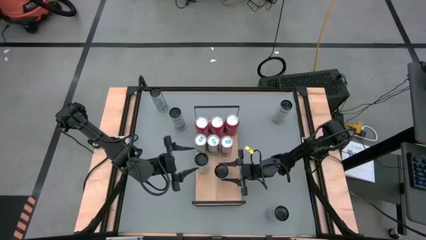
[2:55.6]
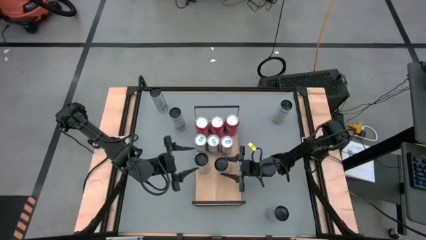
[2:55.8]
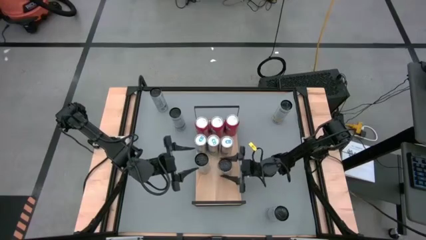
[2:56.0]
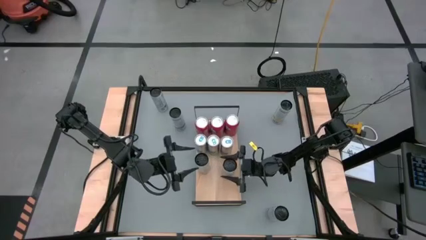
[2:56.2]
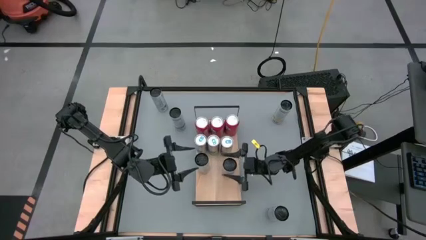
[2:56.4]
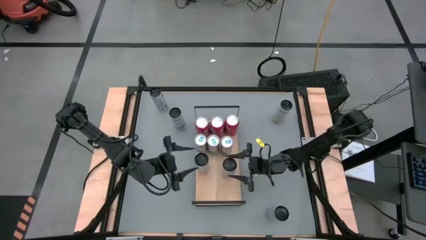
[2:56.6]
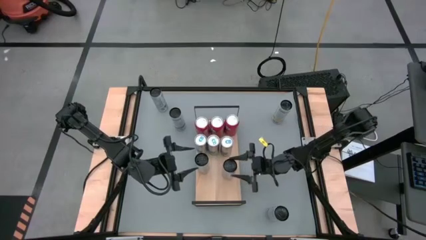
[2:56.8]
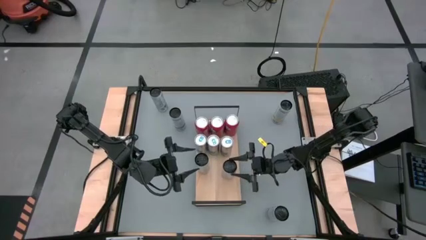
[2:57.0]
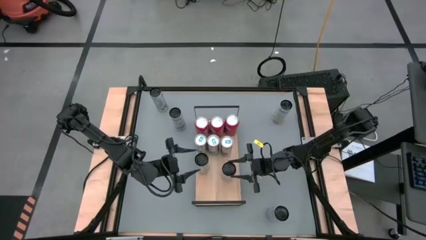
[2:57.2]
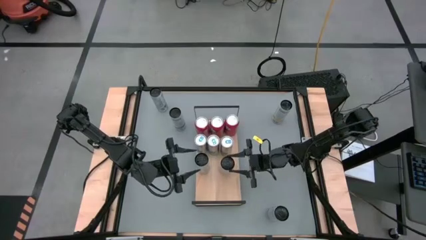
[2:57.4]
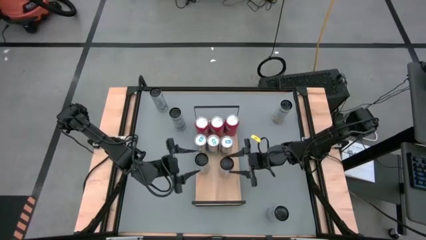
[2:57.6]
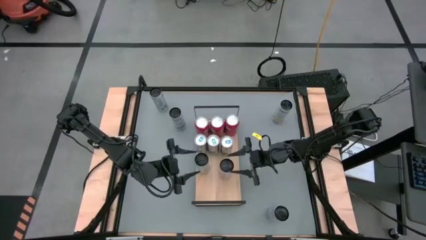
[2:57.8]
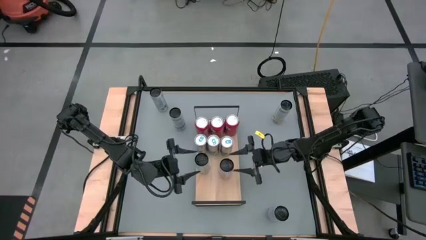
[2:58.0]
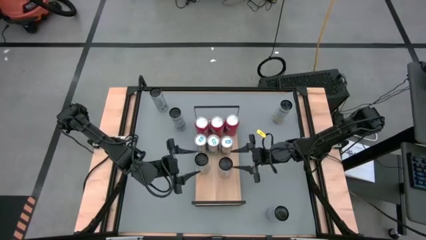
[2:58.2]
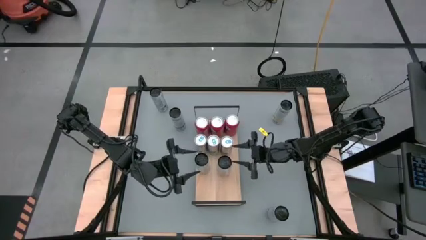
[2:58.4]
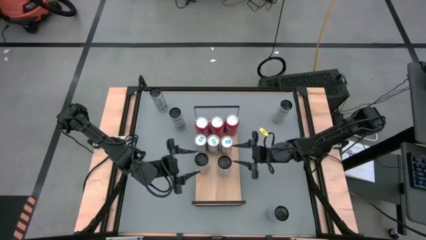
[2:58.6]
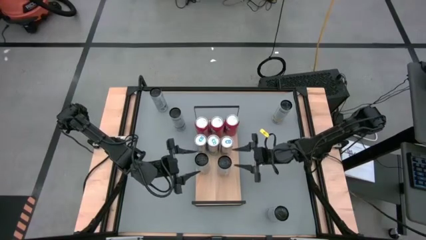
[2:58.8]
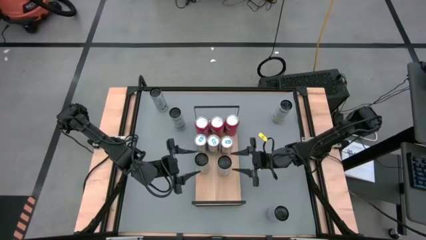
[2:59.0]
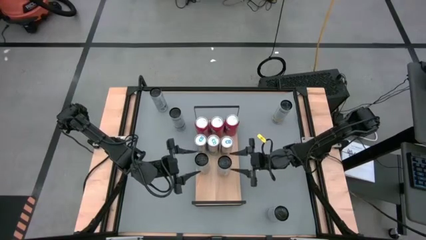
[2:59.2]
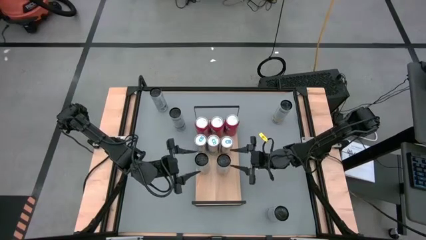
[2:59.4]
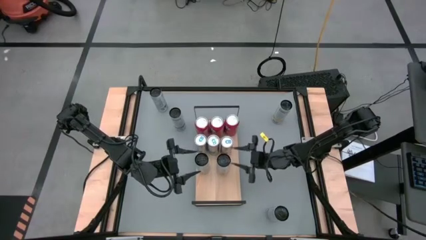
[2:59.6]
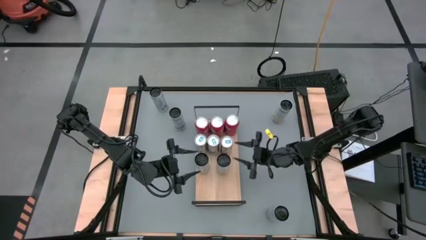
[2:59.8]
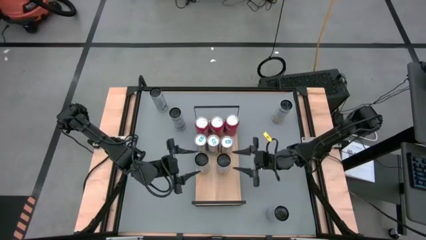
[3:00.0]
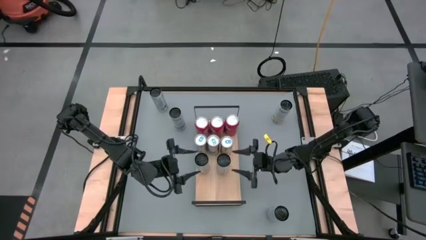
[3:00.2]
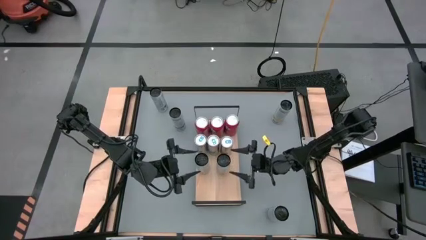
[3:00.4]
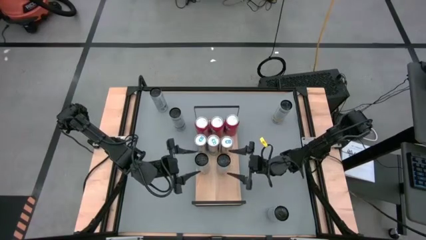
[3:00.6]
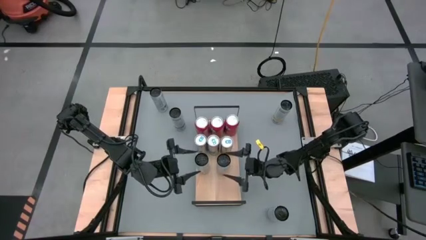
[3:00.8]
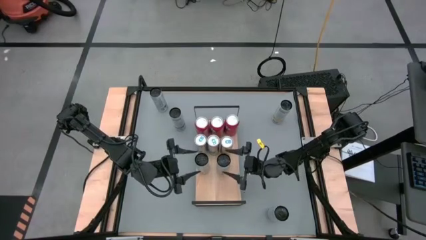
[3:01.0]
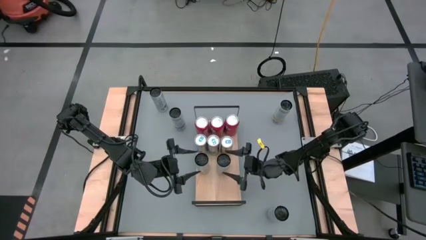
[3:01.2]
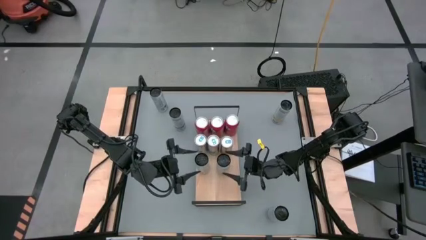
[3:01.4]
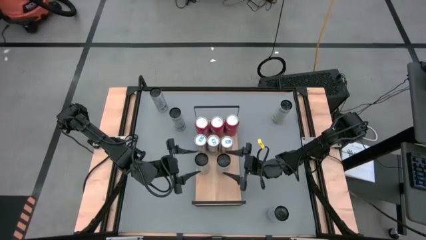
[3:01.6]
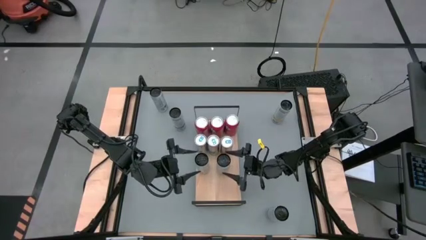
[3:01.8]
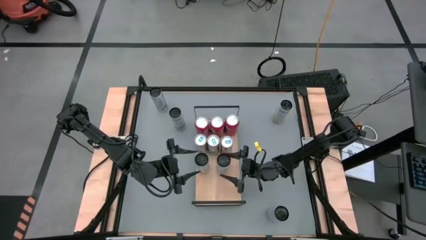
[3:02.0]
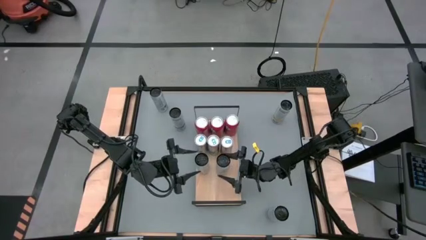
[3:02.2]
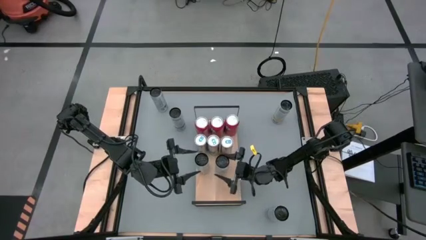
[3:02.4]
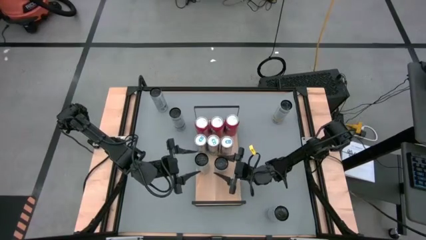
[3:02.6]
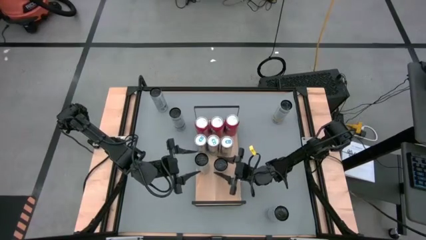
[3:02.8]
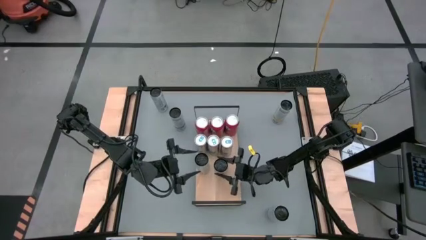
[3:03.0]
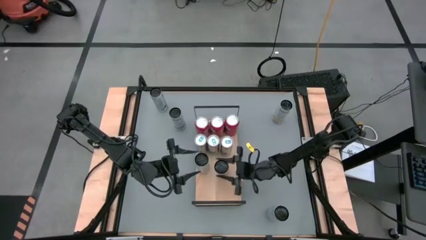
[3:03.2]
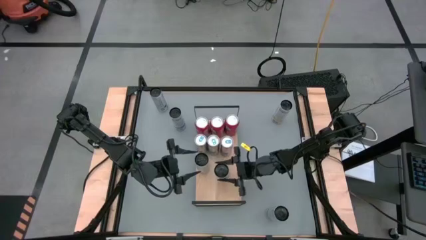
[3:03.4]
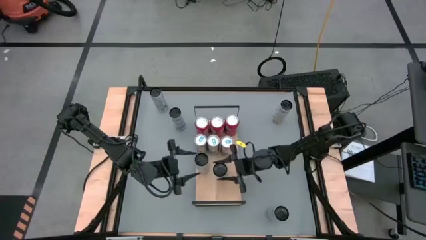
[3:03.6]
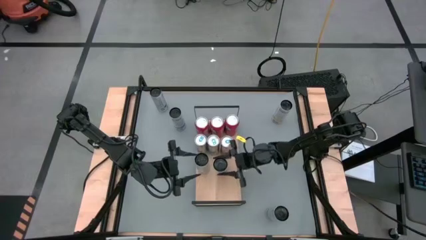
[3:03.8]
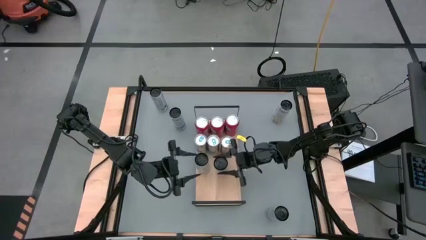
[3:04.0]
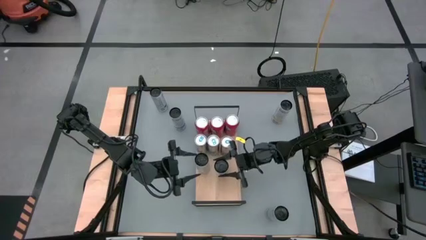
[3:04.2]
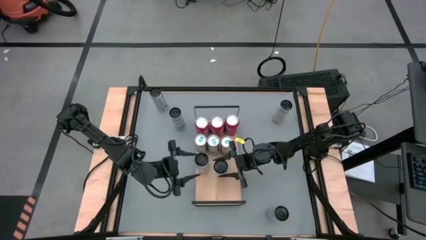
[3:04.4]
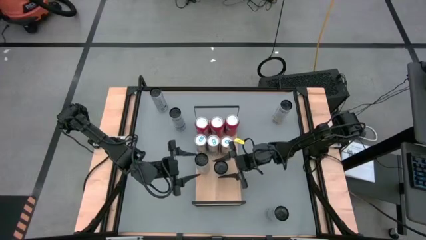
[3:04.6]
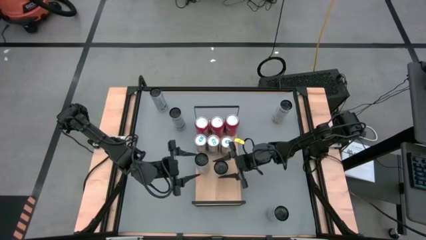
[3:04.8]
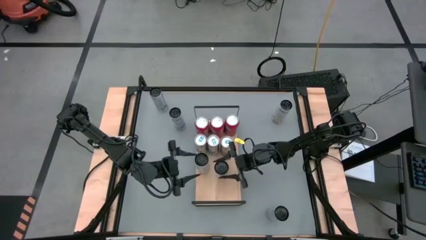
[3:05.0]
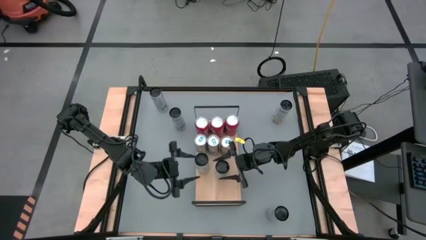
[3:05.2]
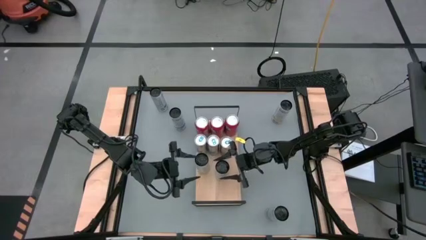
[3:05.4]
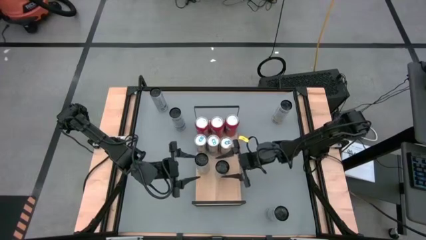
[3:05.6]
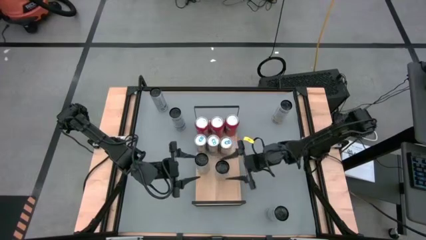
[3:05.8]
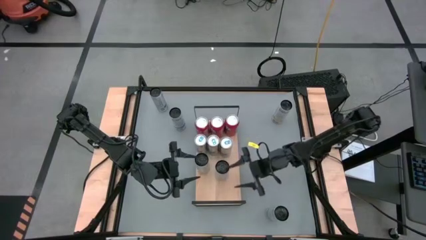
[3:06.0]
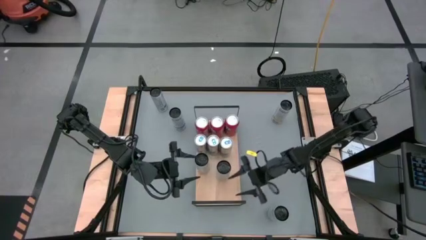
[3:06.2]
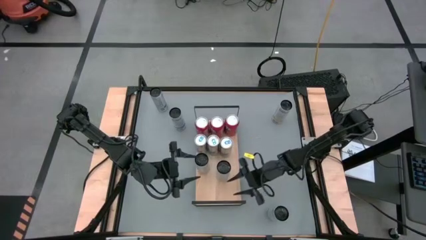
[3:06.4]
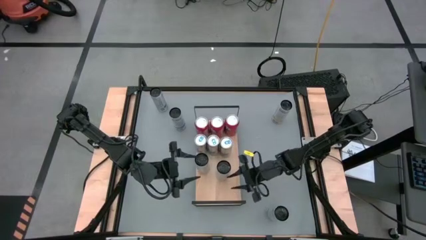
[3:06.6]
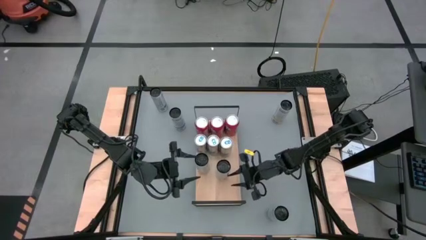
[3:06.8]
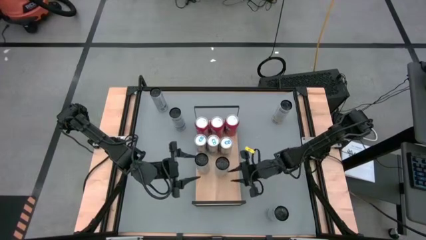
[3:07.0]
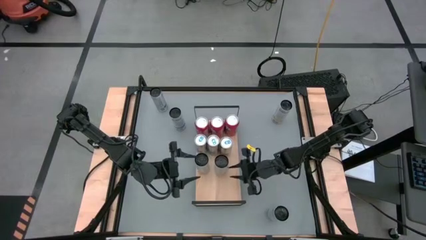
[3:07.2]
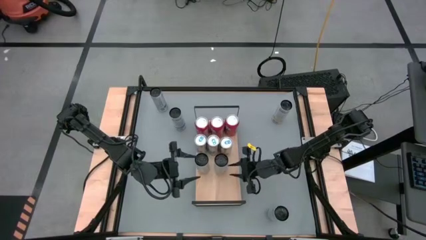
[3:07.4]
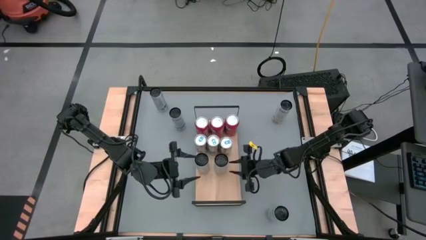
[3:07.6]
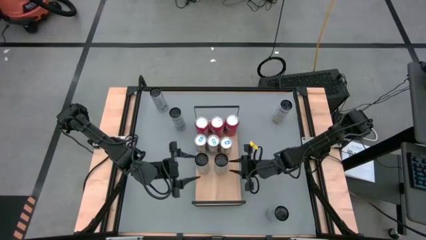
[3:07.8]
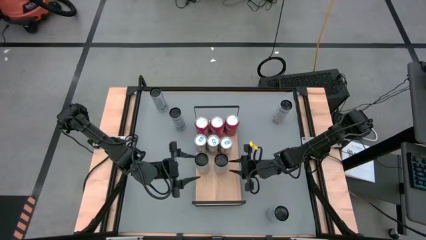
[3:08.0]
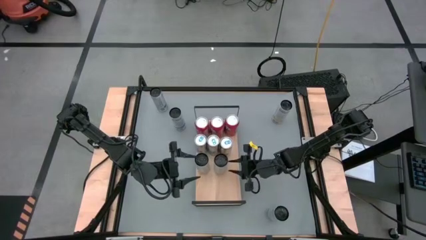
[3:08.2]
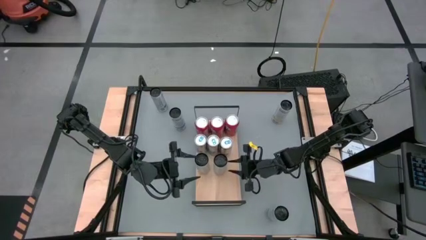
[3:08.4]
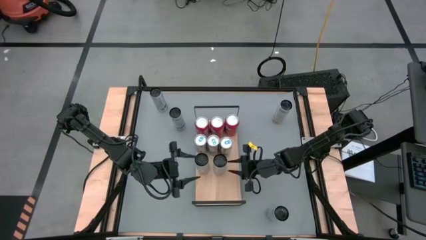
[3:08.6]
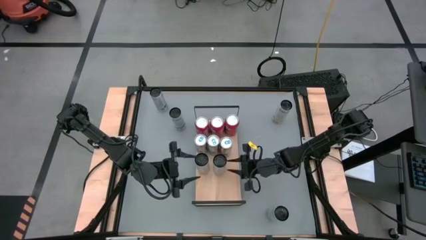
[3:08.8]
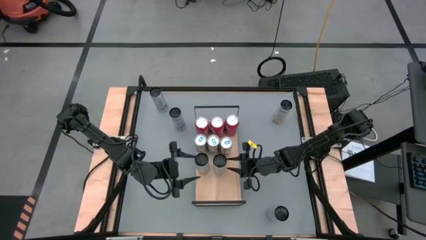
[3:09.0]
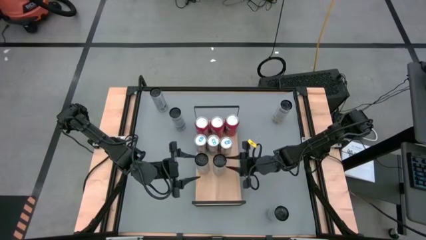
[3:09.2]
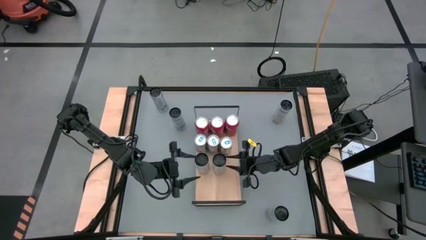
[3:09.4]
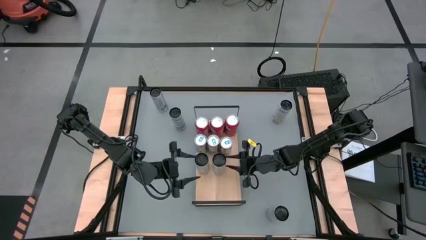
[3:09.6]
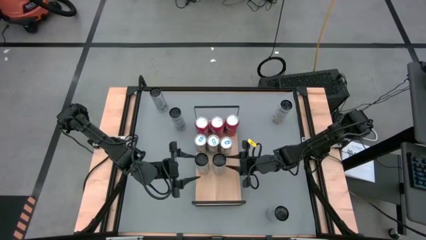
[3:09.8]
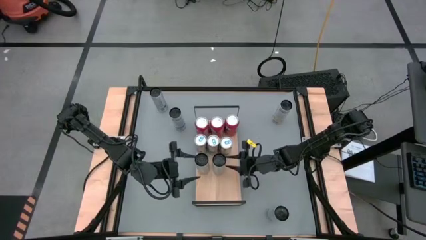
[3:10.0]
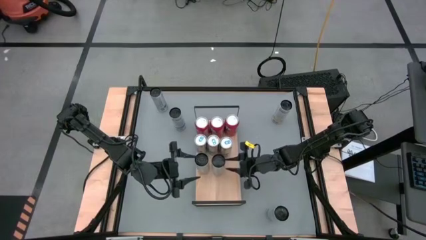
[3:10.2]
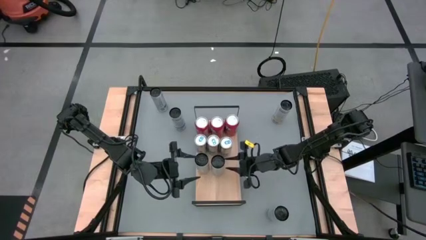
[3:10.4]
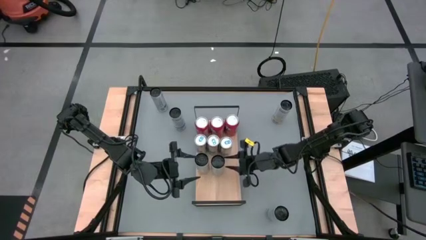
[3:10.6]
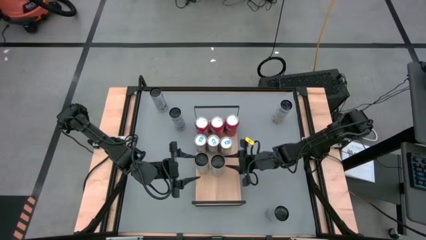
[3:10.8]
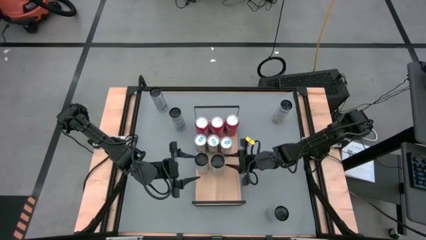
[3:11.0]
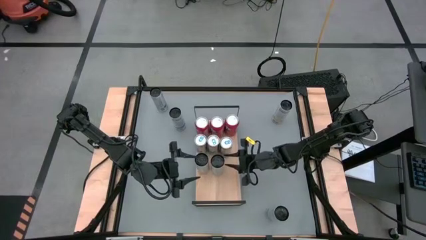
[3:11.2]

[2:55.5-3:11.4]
Task: Place canned beverage on shelf
Put the bottom white-yellow soda can aligned with the other white-yellow soda can on the shelf
